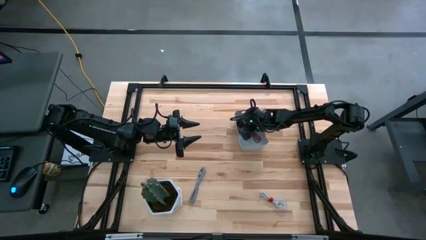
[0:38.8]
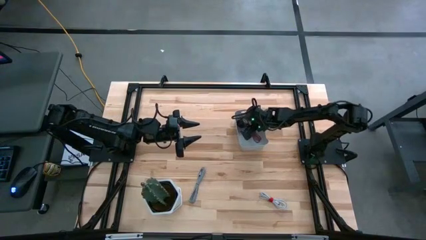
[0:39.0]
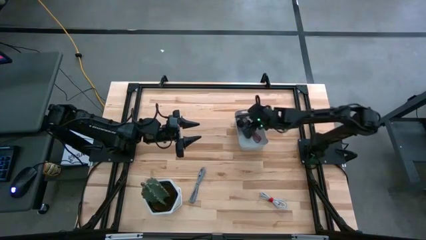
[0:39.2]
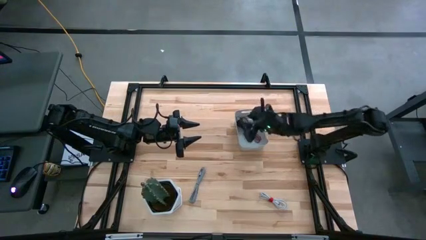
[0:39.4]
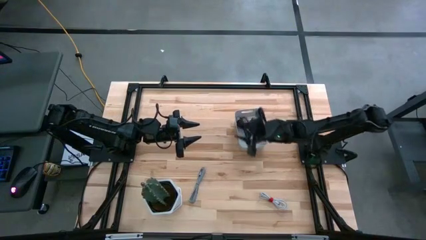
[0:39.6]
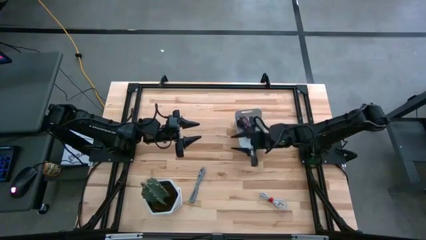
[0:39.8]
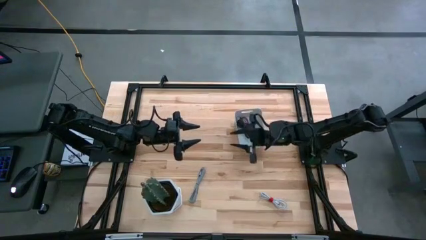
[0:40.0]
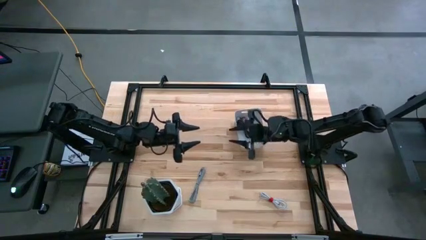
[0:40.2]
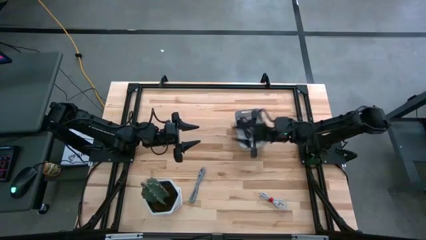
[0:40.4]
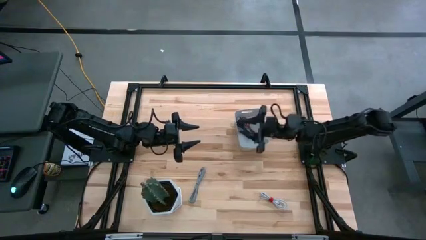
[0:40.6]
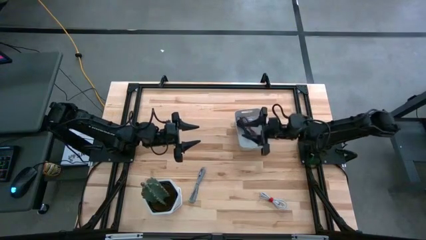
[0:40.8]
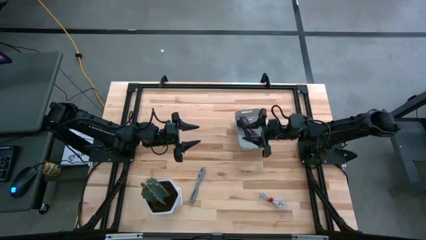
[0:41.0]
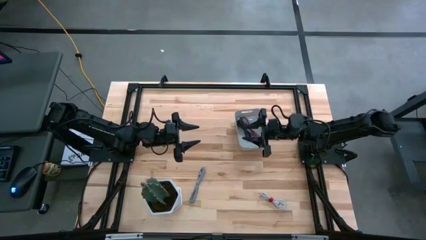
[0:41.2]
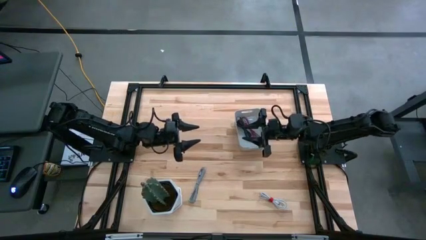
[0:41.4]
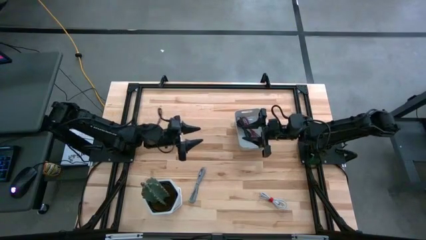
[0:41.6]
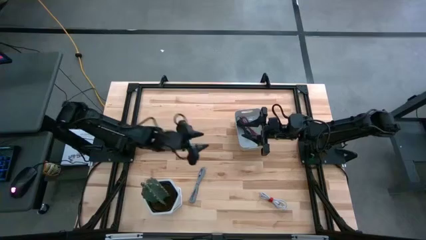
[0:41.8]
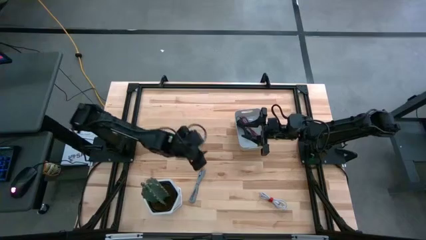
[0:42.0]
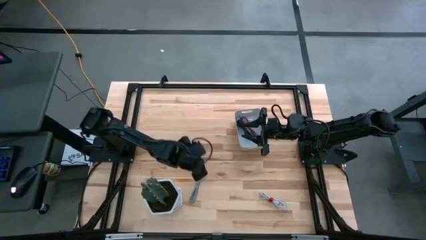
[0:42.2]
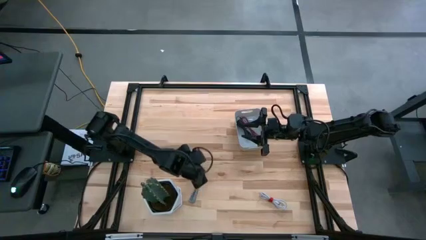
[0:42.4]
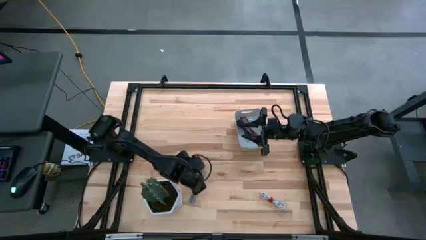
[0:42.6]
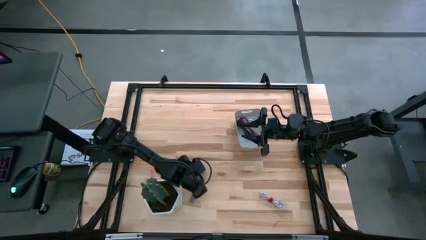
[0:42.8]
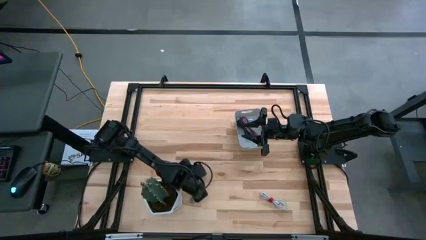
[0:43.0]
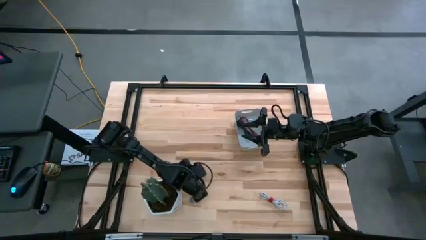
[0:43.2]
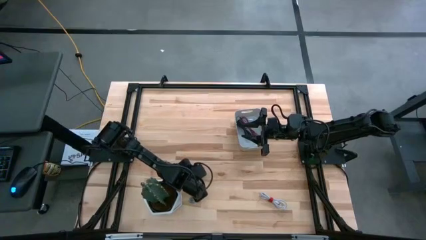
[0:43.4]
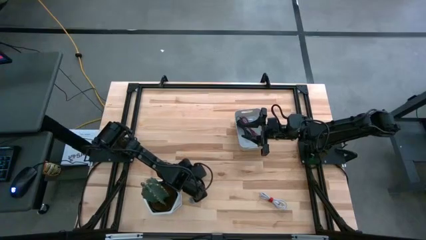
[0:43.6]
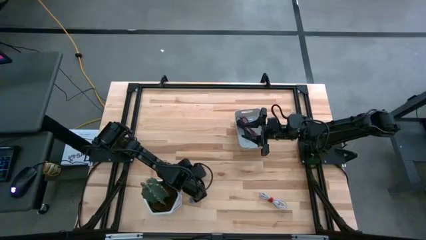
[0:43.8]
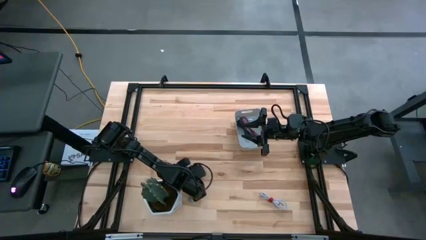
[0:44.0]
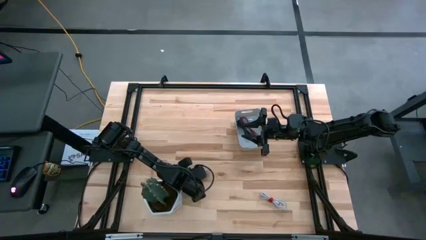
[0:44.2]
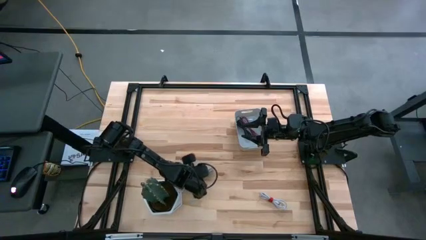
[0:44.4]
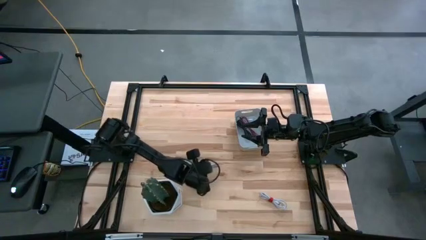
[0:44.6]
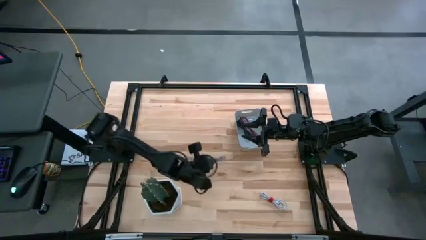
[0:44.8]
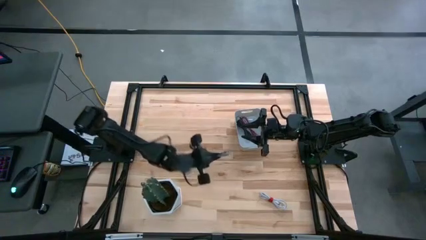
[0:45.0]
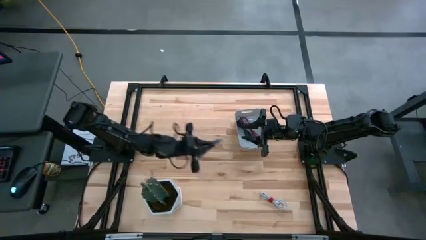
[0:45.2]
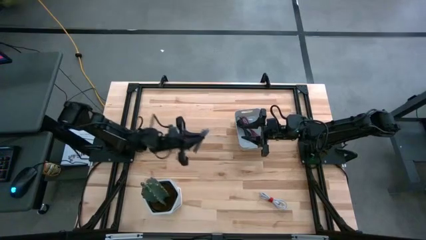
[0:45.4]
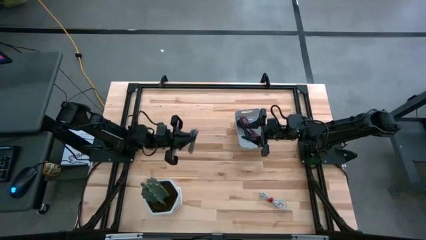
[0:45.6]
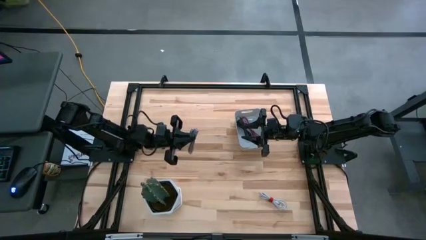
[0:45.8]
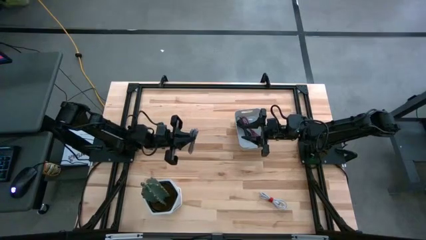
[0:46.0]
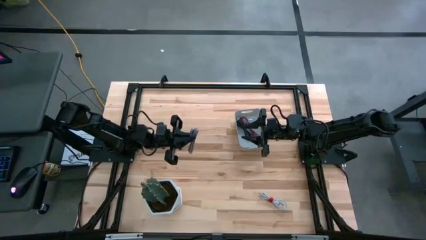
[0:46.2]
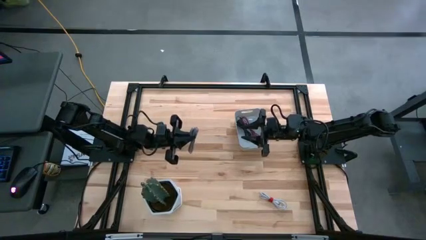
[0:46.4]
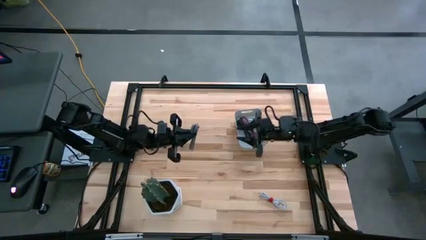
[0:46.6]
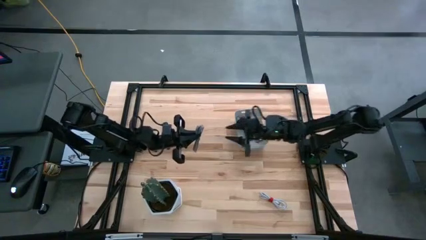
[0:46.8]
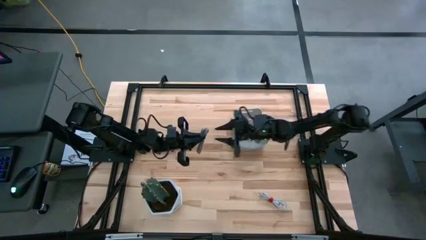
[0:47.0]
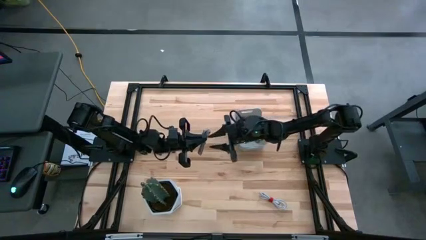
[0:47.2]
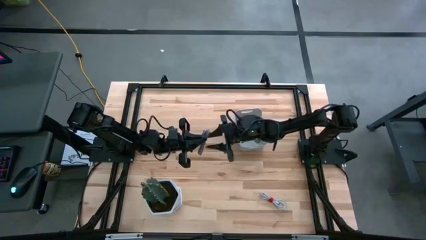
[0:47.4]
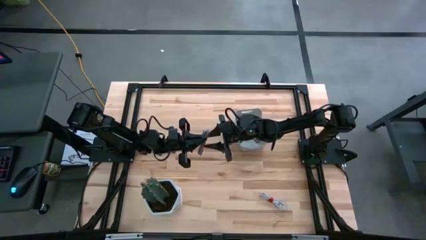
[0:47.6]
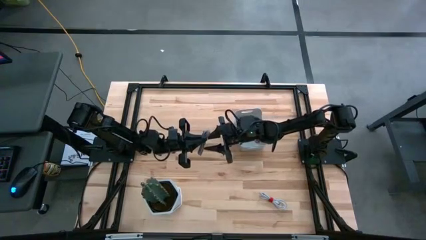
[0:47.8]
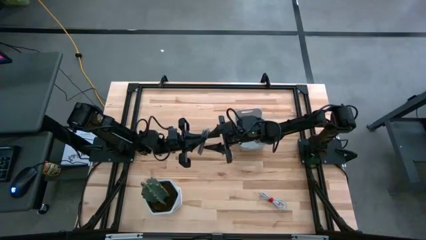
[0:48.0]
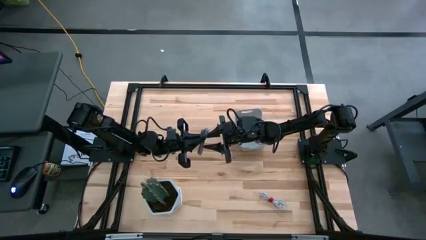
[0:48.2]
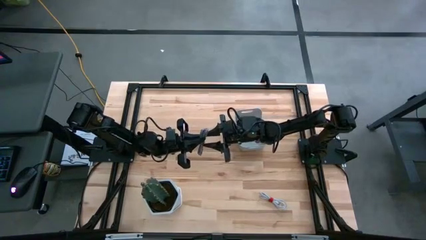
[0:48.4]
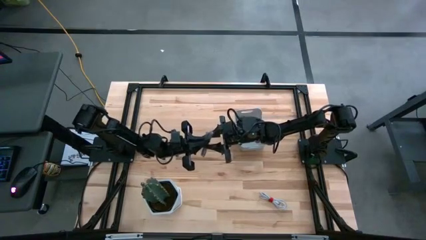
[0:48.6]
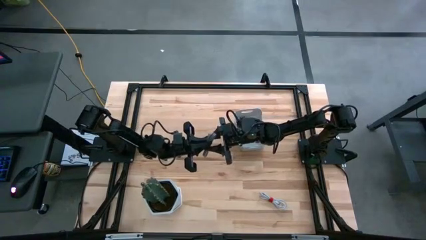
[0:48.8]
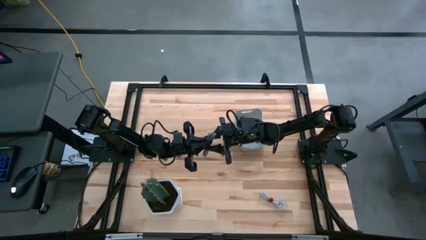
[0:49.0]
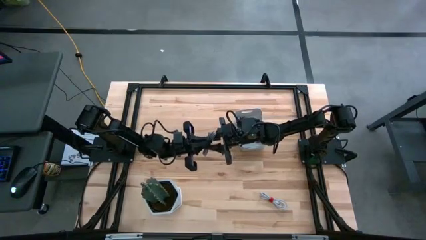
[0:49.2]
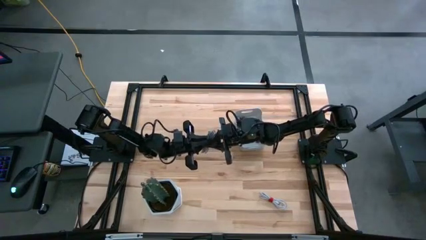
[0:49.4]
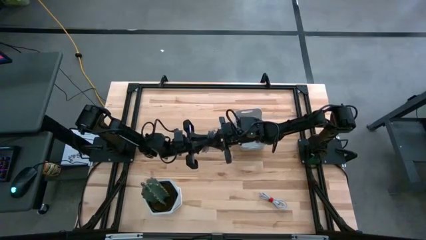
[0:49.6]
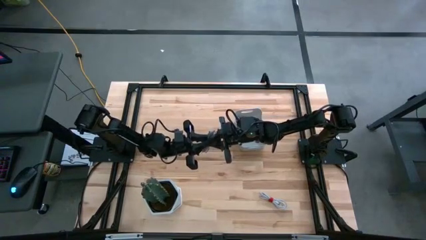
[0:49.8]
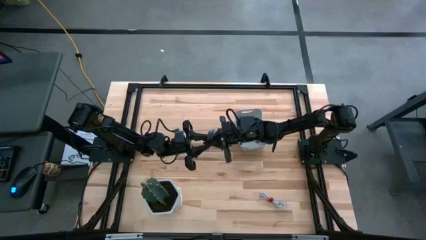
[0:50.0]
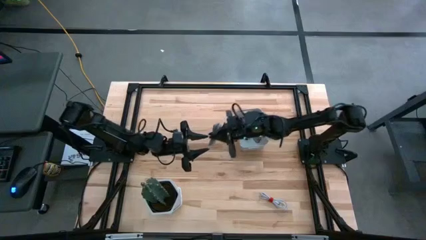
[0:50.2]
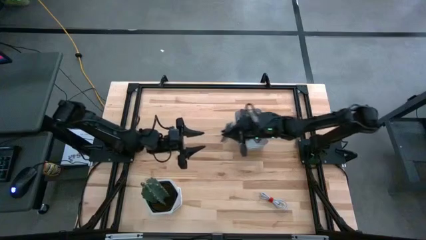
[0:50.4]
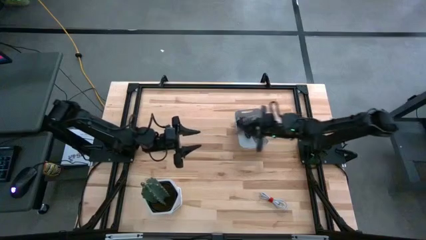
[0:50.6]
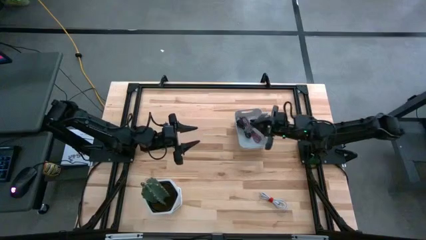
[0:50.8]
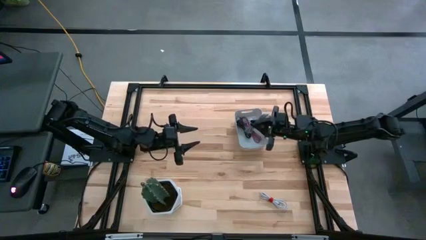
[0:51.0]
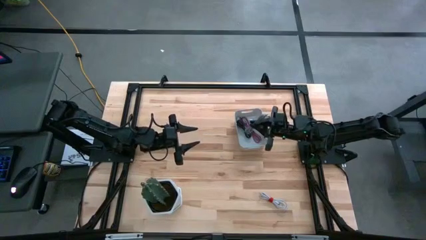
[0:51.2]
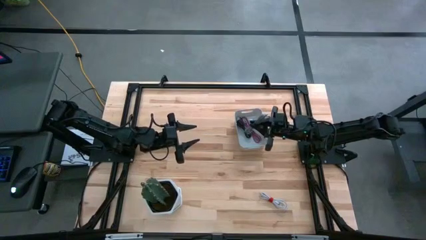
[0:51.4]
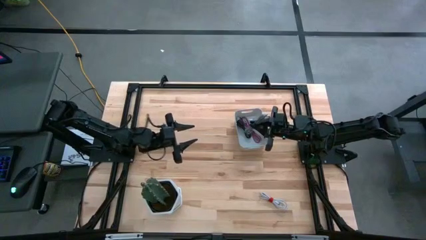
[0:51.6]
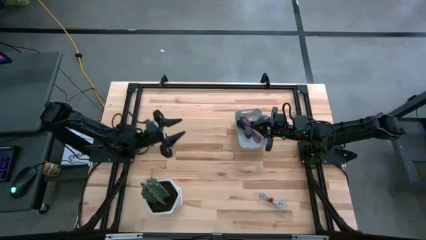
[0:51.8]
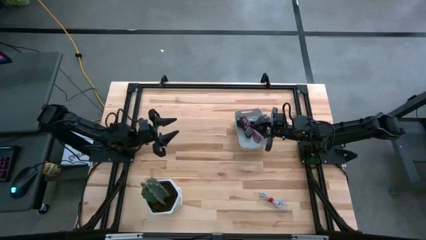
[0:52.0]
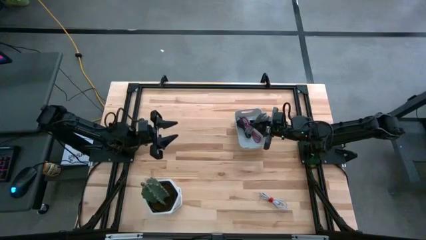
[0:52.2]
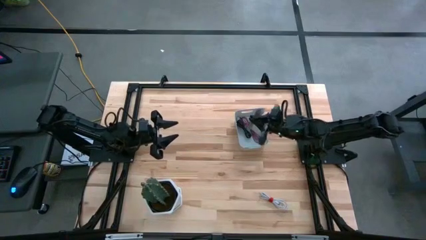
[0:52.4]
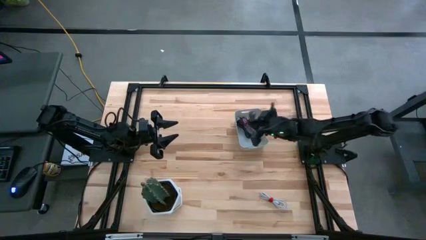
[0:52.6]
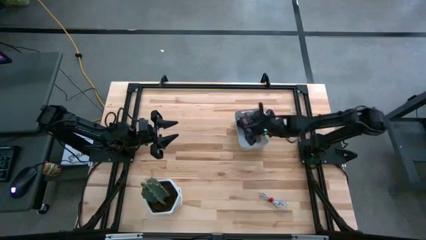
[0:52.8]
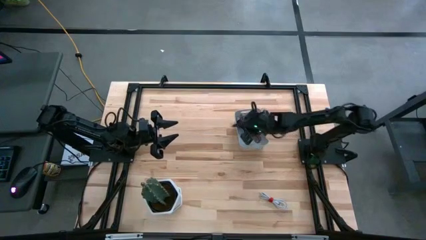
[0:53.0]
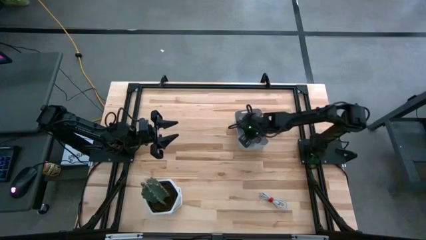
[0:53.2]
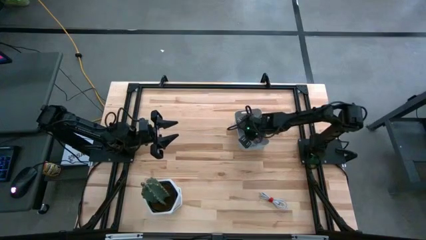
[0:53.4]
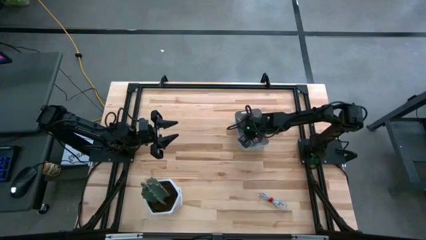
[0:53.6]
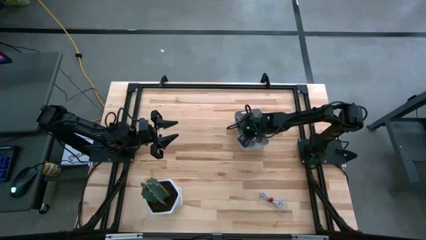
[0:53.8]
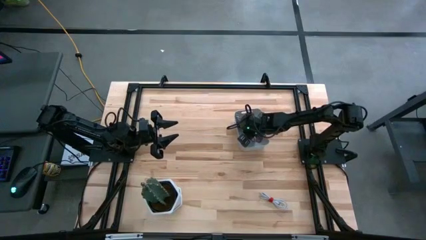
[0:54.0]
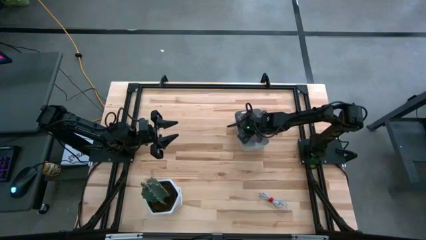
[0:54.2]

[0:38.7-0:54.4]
Task: Pick and place USB-C Cables
Put the black and white charger cable into the gray bin
